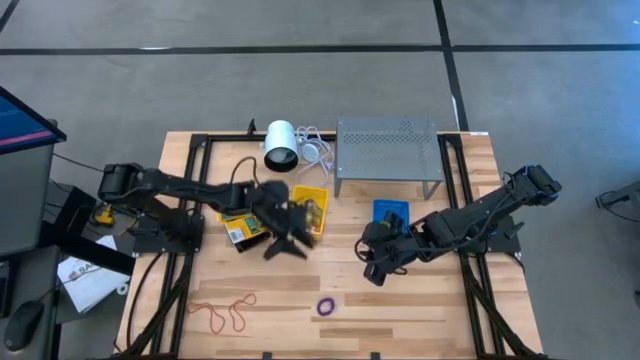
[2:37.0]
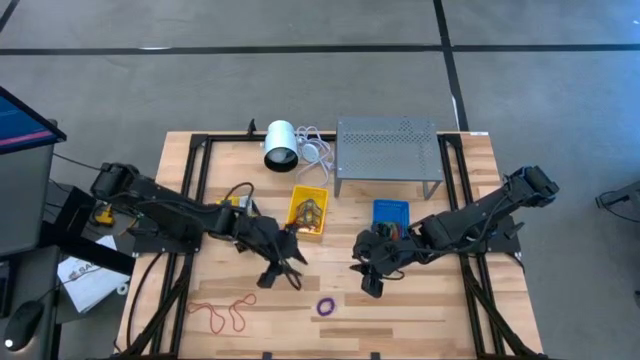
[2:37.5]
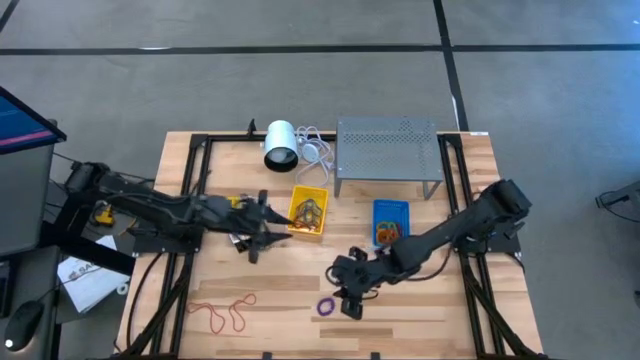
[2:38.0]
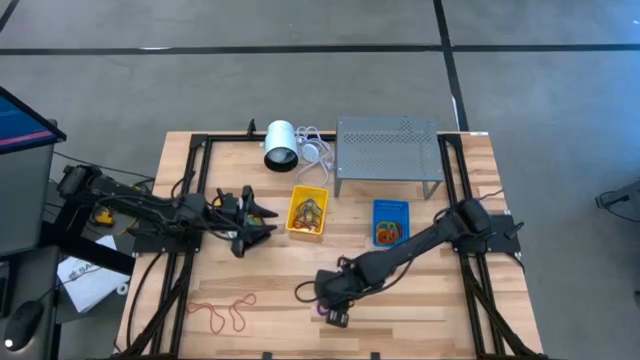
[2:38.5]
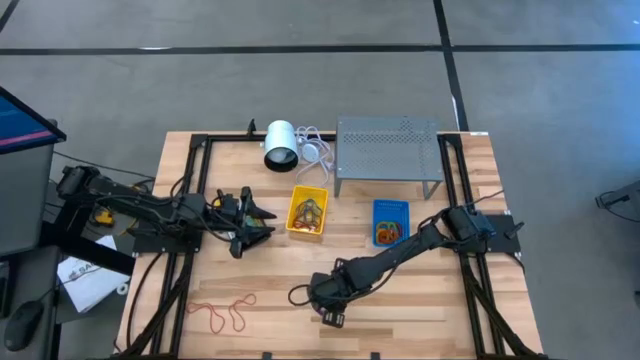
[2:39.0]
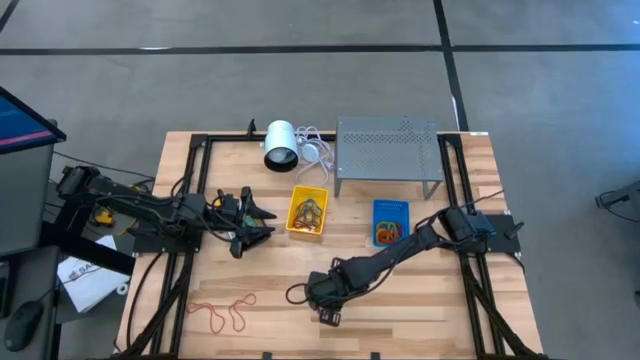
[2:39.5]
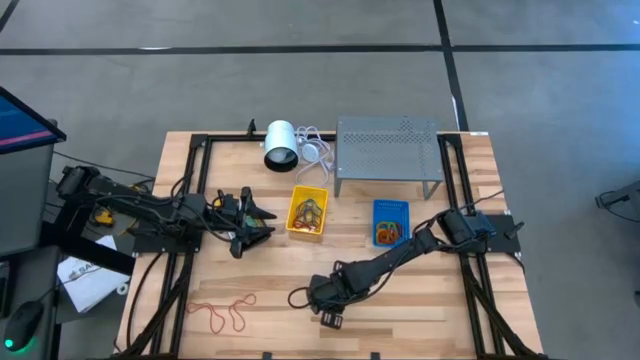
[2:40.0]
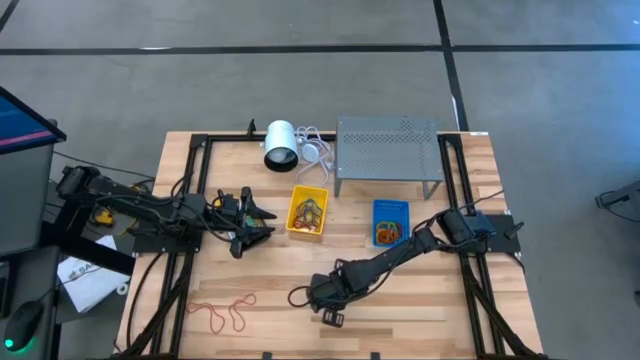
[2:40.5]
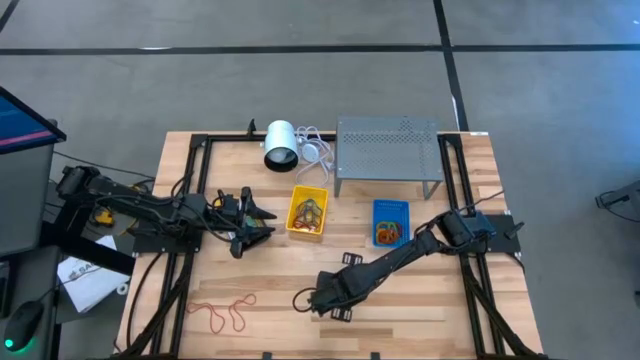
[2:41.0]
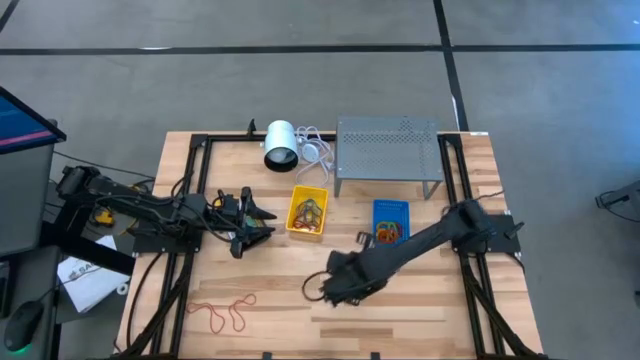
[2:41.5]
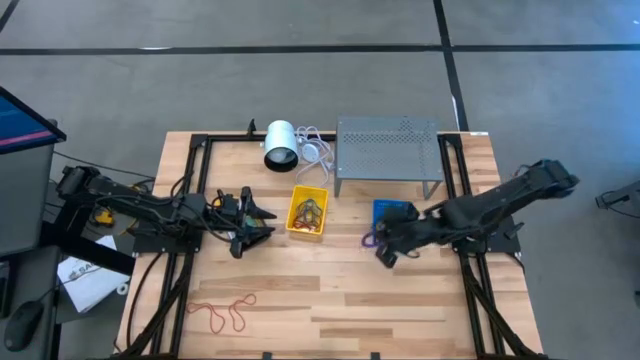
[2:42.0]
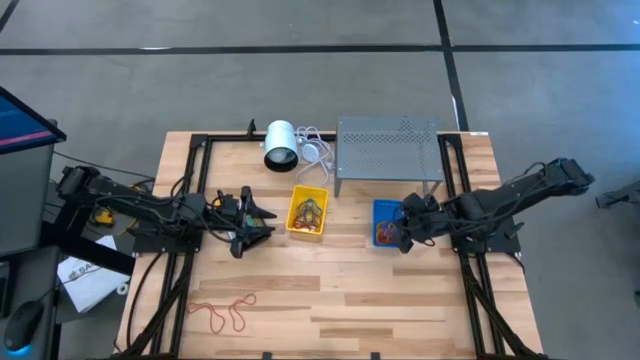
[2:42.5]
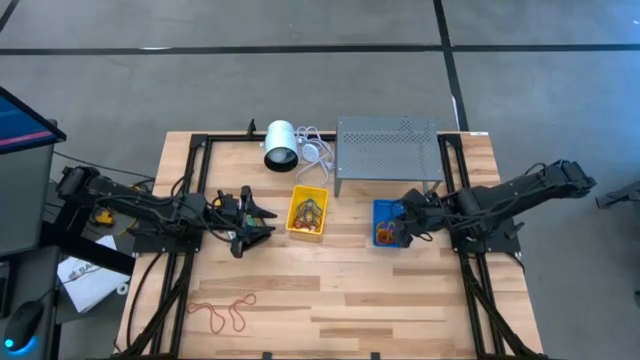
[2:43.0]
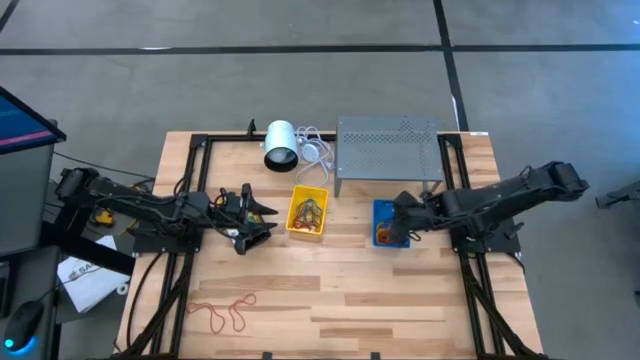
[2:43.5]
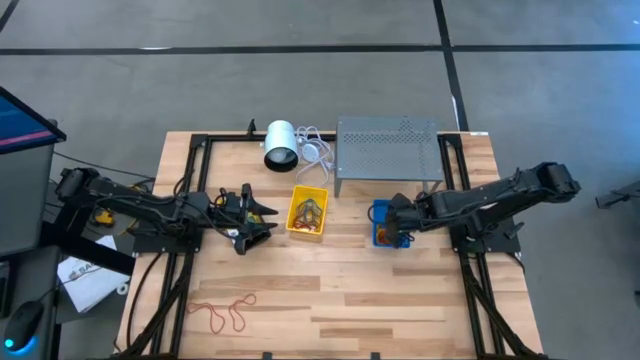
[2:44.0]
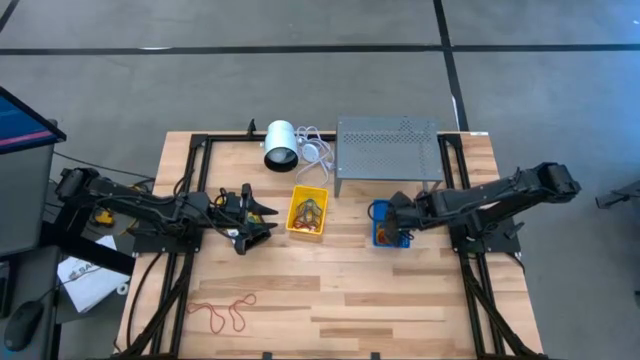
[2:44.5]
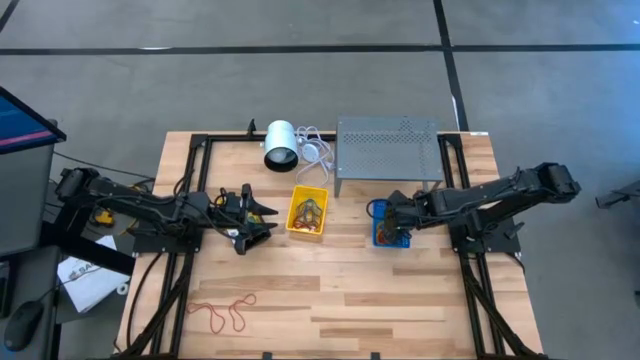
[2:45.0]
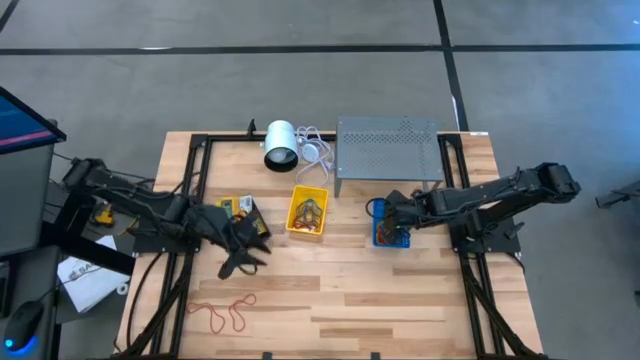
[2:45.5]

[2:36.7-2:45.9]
Task: Pick & Place Office Desk Supplies
Put the violet elastic key ring into the blue basket

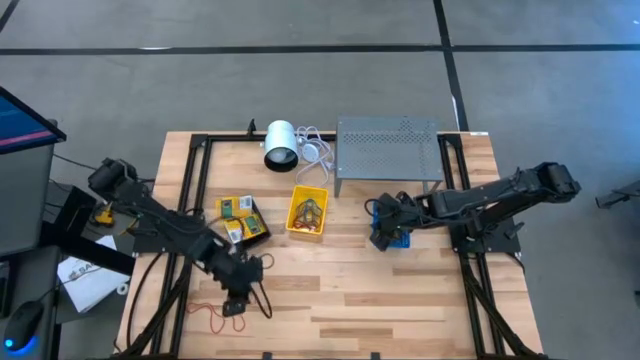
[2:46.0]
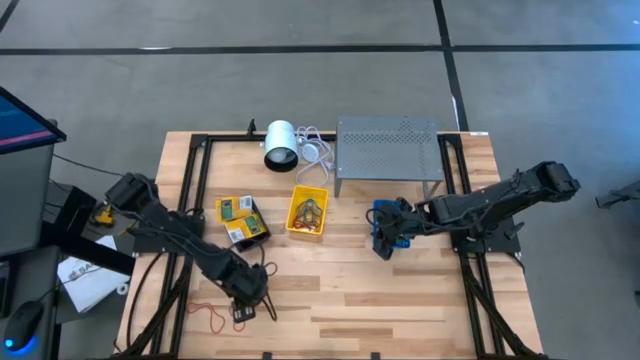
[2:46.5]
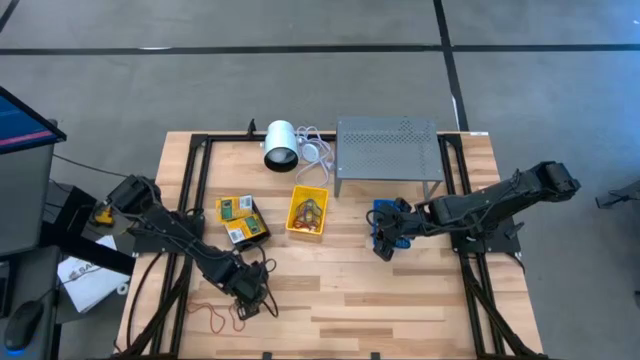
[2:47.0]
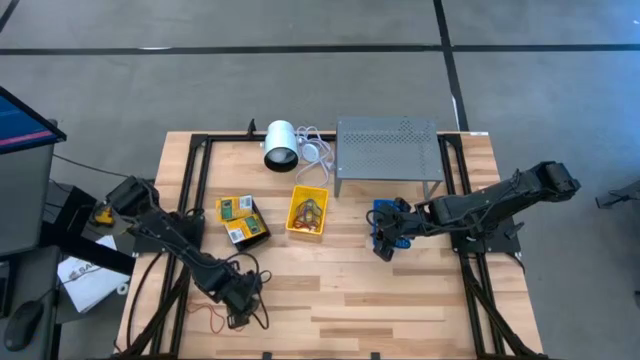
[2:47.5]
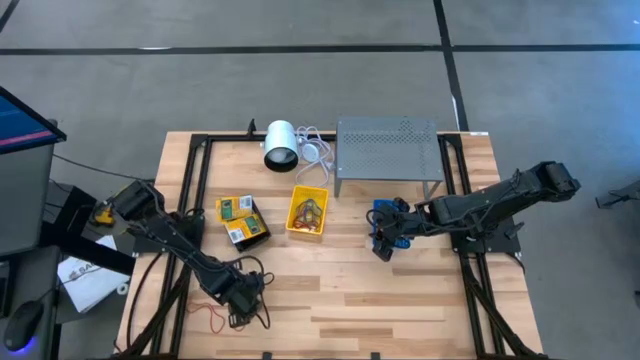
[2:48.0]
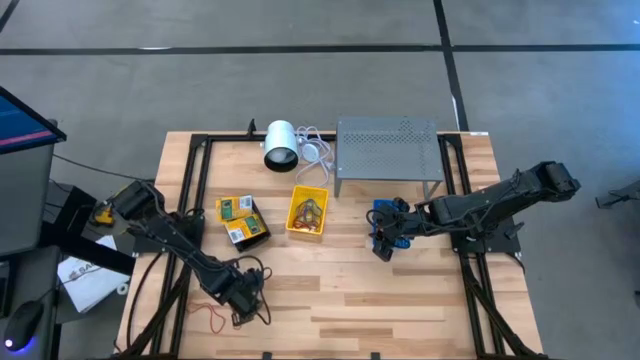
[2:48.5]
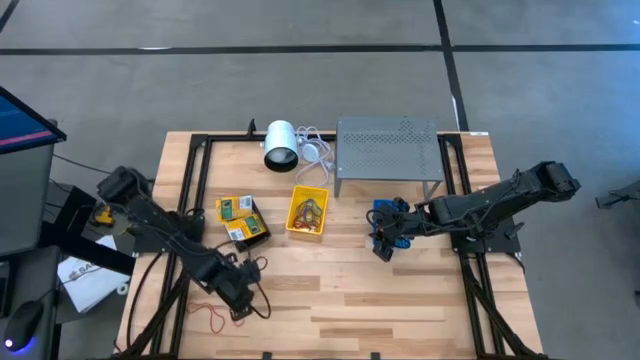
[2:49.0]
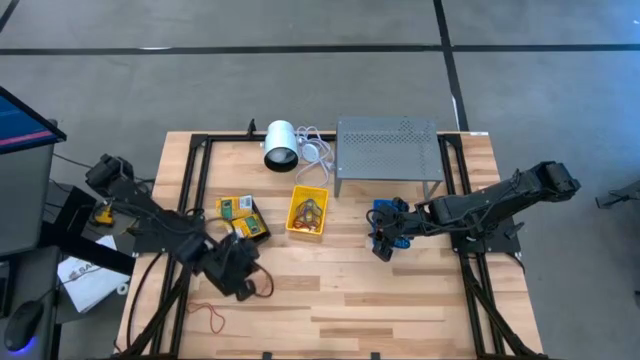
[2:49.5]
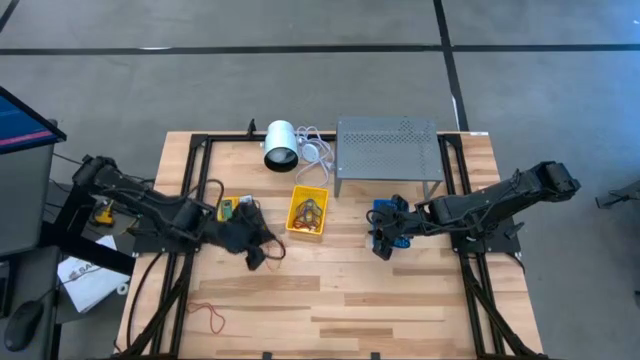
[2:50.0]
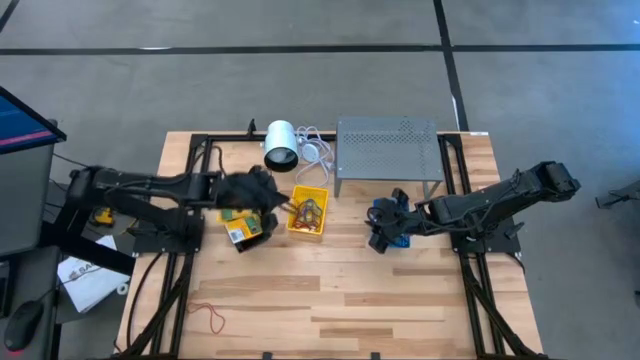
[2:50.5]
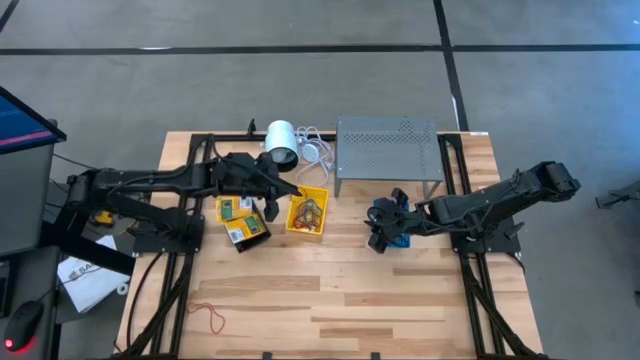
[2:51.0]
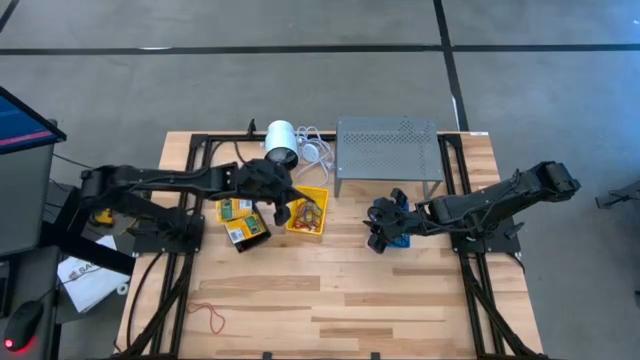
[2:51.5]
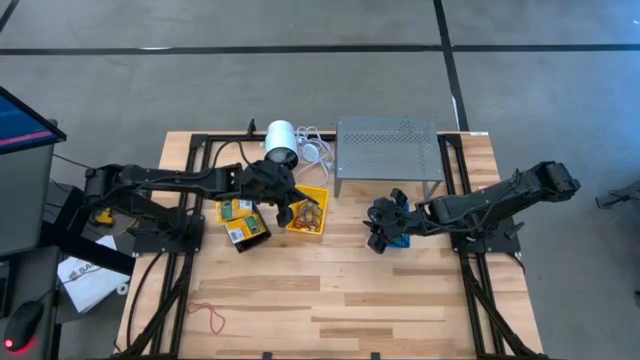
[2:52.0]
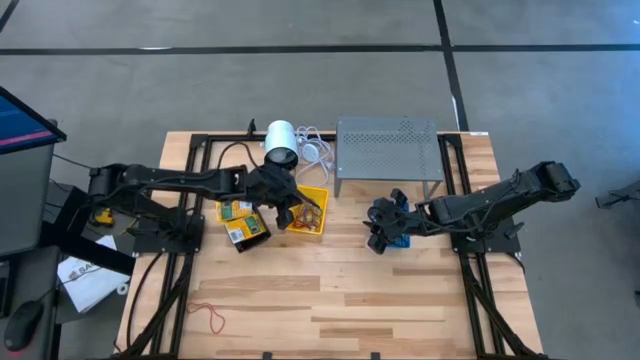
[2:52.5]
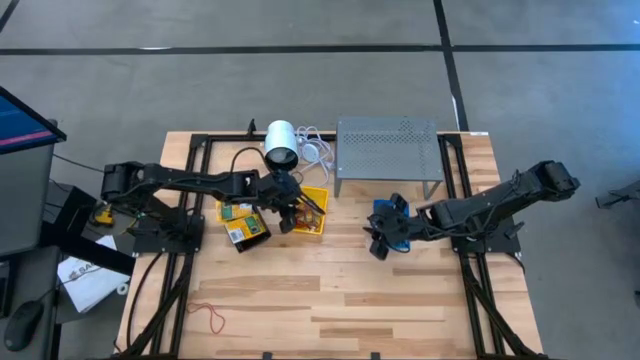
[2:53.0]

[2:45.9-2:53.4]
Put the right red rubber band into the yellow basket

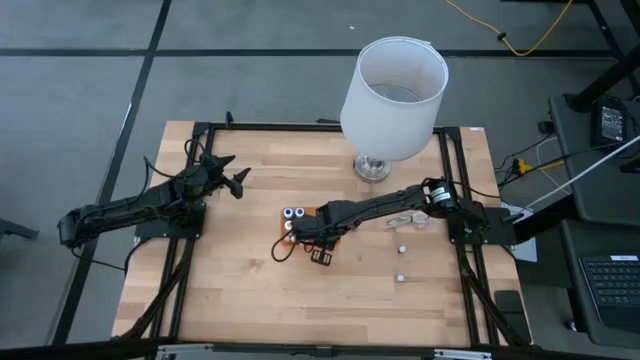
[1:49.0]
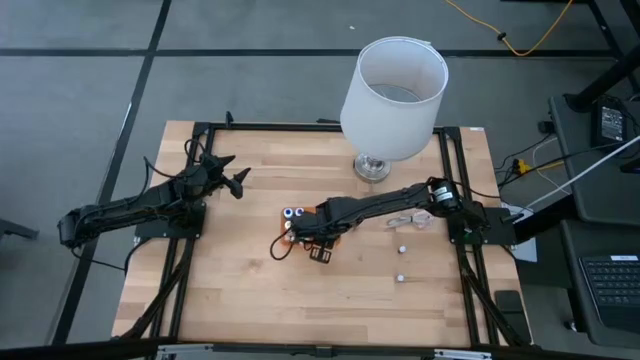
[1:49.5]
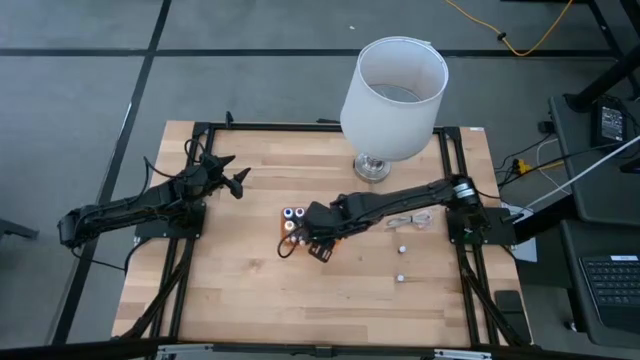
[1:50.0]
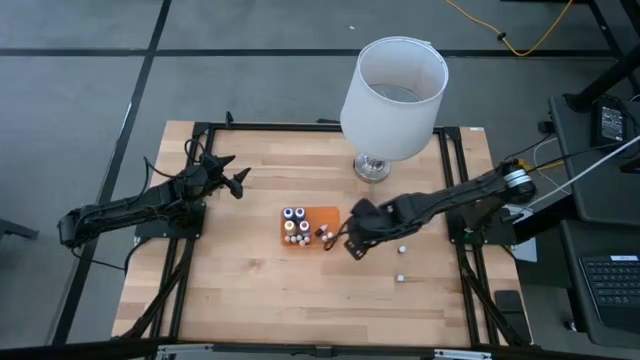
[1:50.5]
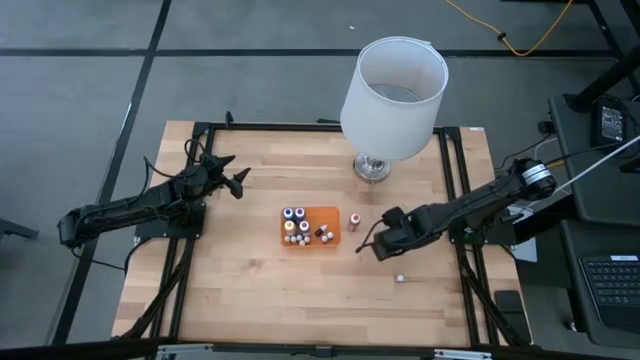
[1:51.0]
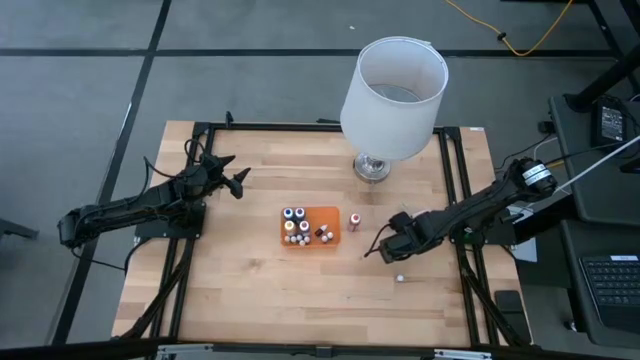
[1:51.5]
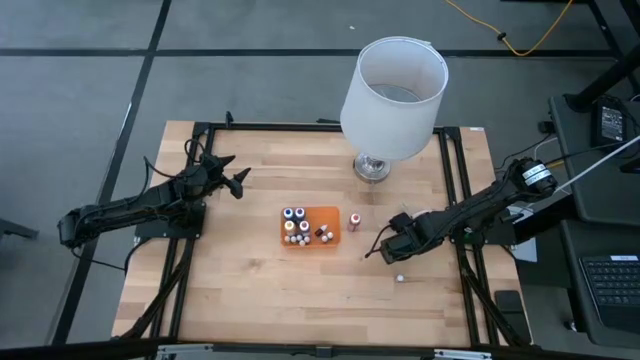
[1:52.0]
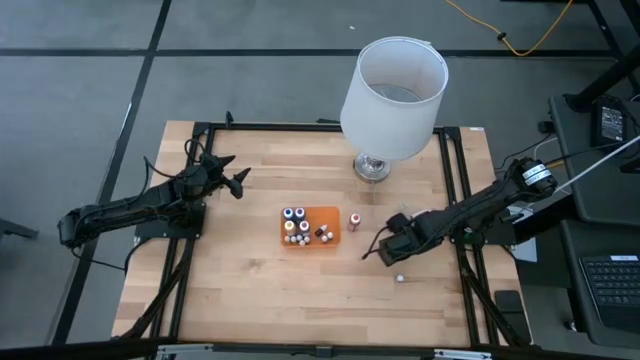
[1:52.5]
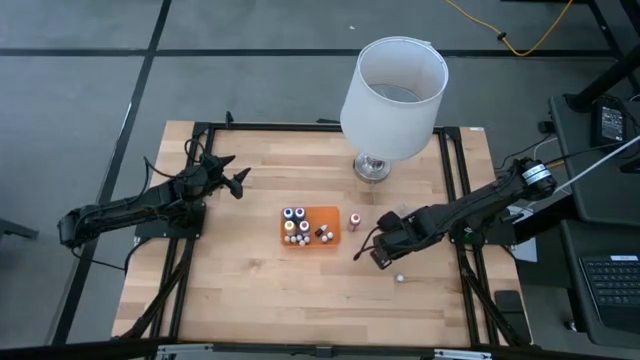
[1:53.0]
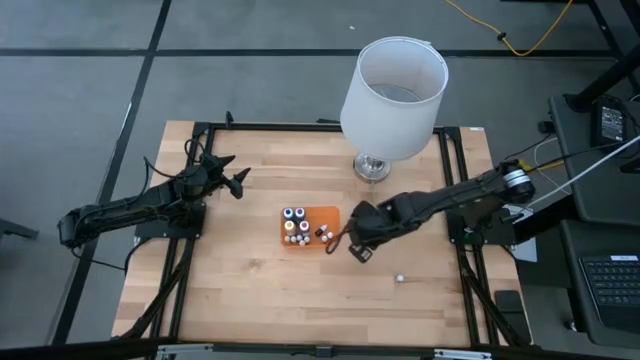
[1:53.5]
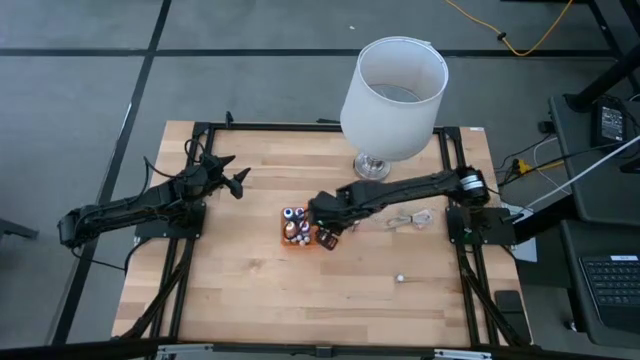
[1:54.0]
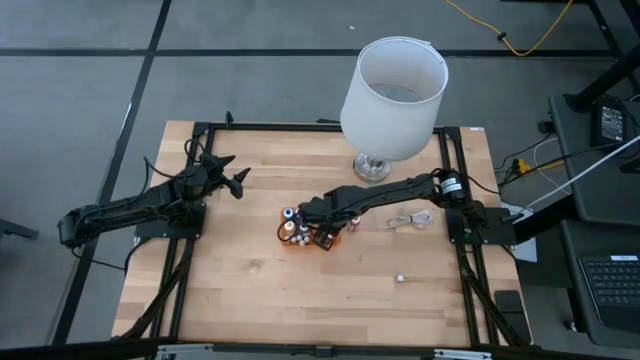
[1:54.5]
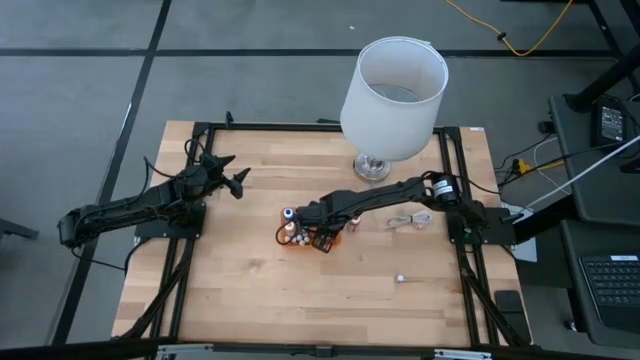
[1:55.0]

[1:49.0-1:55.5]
Task: Pick & Place food coloring
Put the small red food coloring bottle into the orange bin
